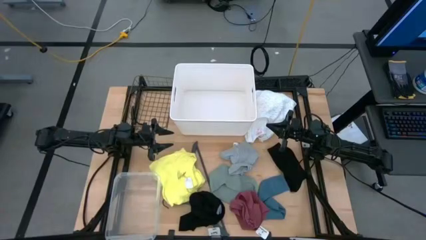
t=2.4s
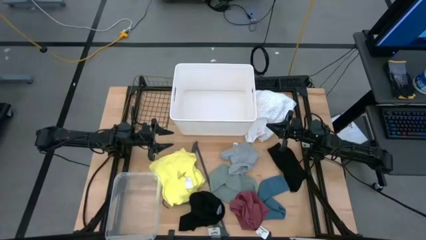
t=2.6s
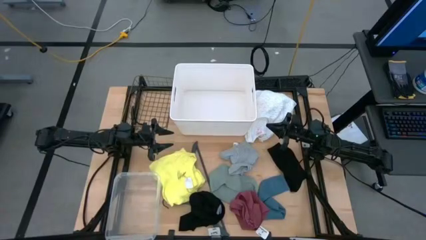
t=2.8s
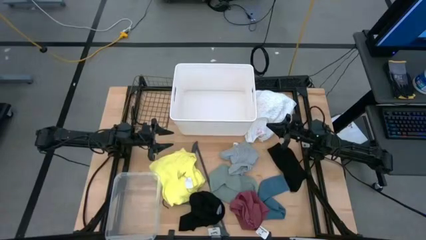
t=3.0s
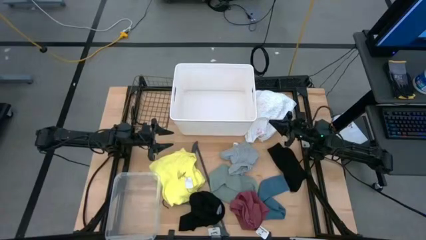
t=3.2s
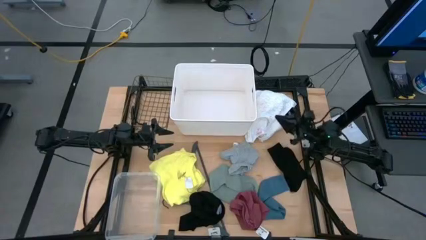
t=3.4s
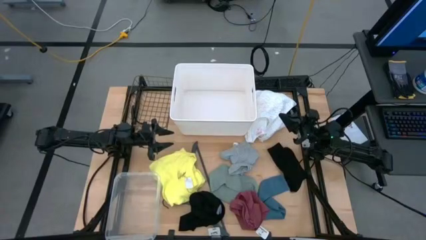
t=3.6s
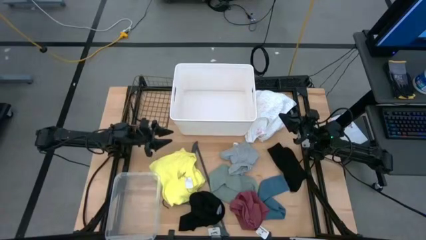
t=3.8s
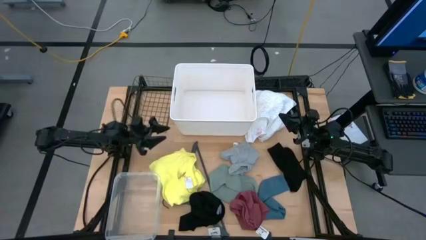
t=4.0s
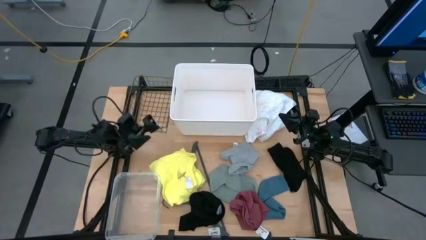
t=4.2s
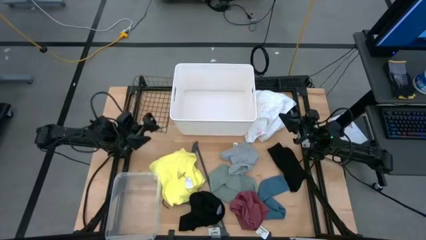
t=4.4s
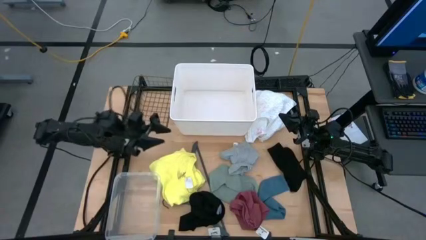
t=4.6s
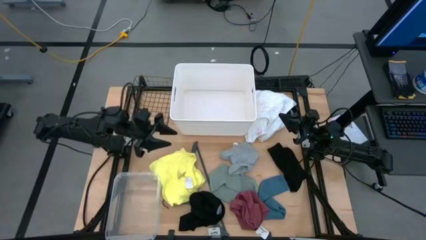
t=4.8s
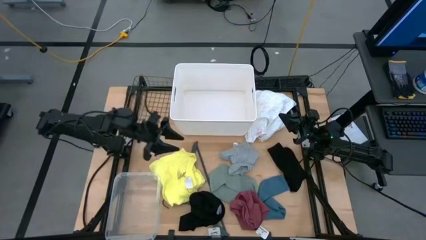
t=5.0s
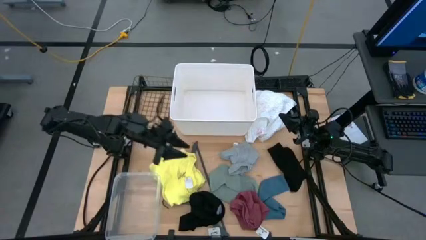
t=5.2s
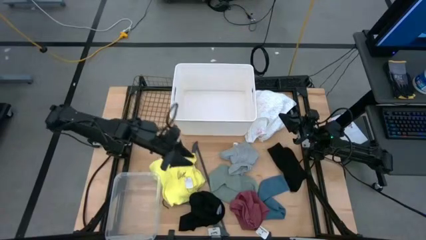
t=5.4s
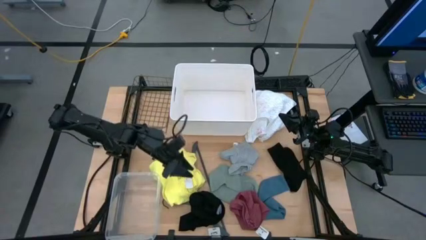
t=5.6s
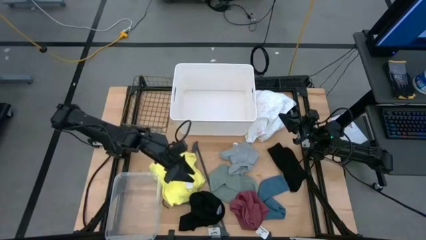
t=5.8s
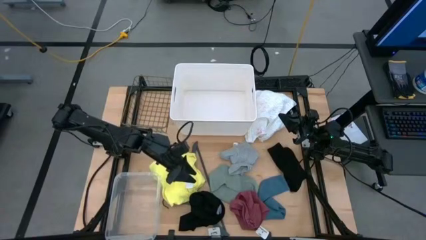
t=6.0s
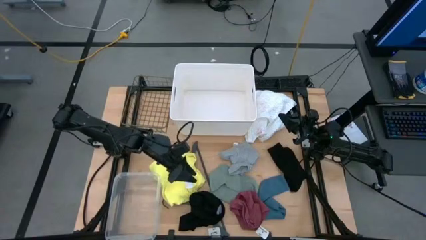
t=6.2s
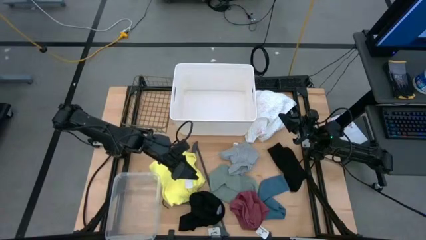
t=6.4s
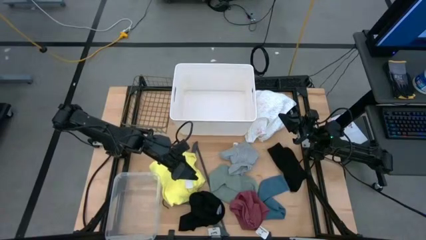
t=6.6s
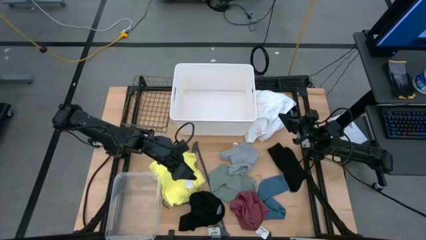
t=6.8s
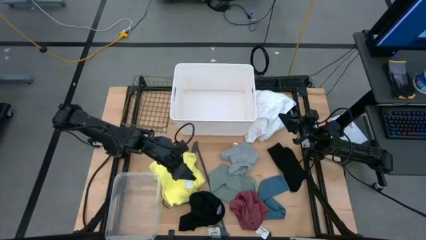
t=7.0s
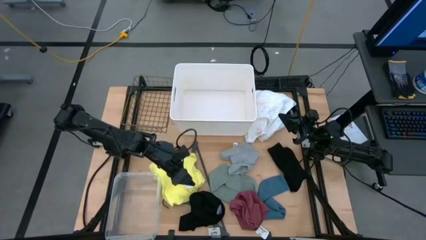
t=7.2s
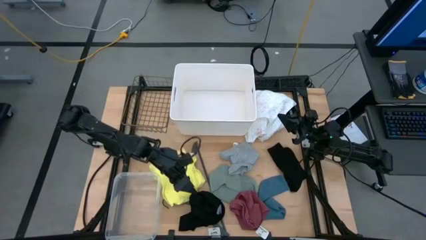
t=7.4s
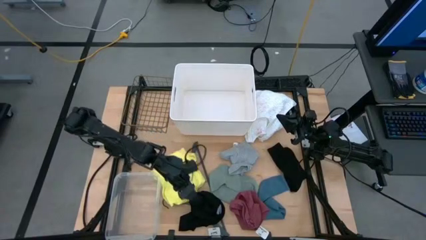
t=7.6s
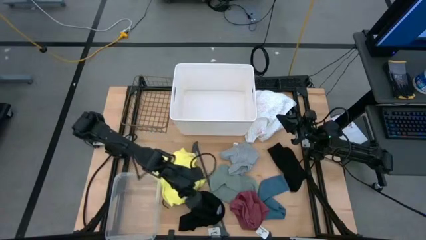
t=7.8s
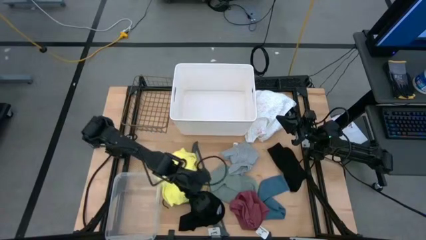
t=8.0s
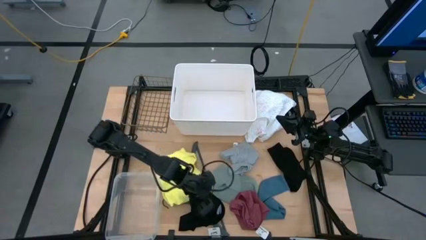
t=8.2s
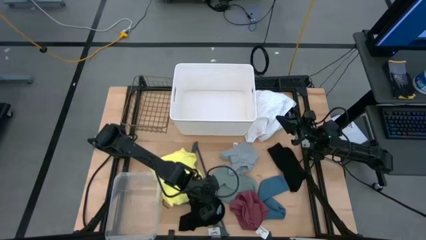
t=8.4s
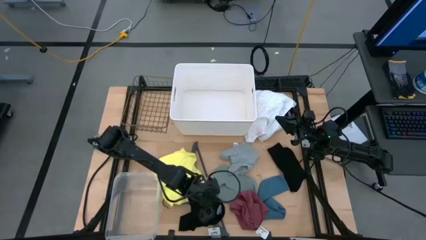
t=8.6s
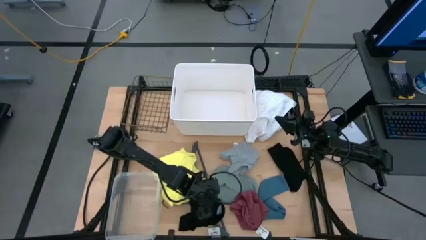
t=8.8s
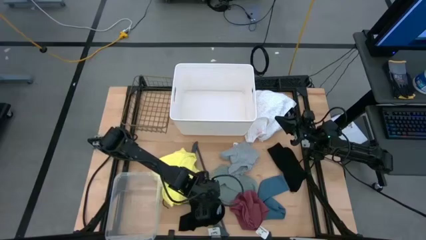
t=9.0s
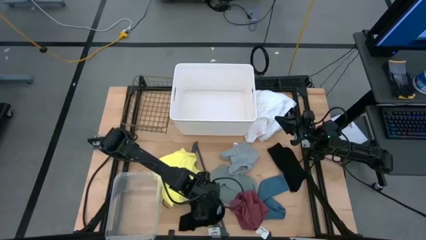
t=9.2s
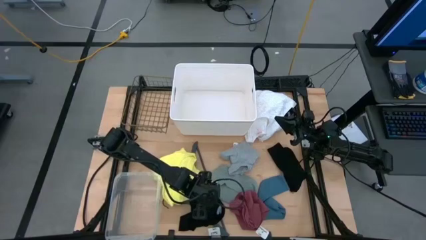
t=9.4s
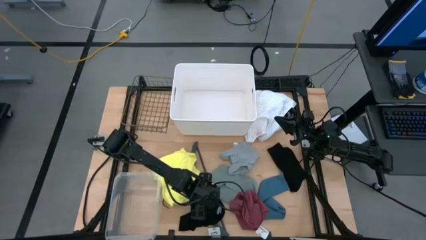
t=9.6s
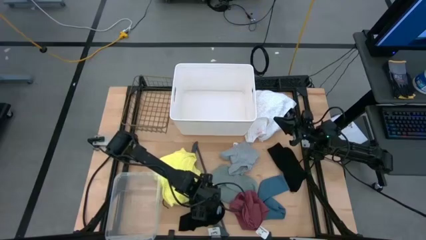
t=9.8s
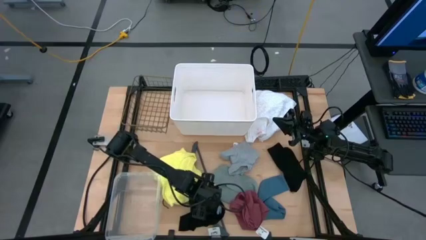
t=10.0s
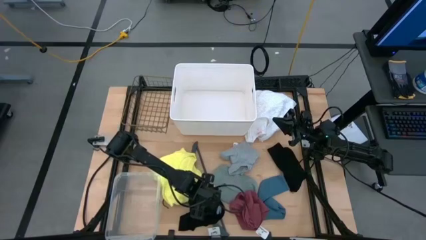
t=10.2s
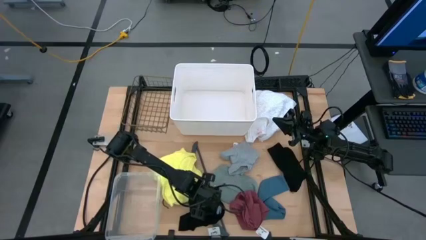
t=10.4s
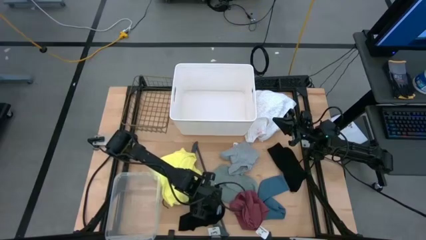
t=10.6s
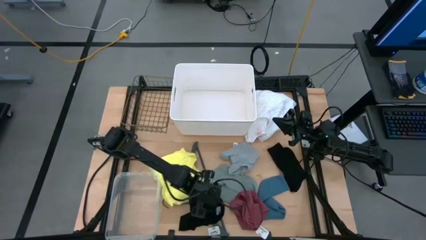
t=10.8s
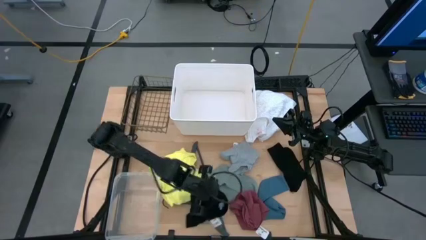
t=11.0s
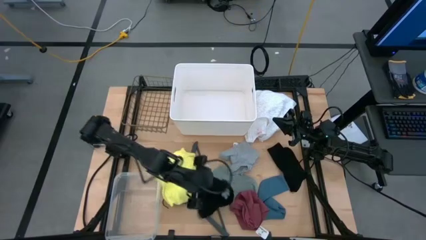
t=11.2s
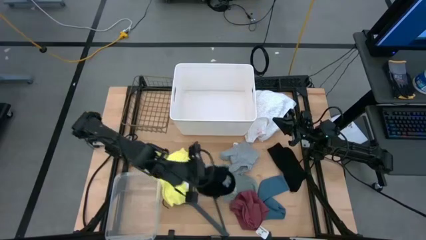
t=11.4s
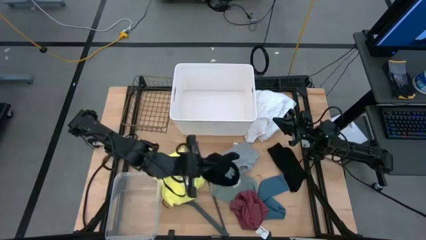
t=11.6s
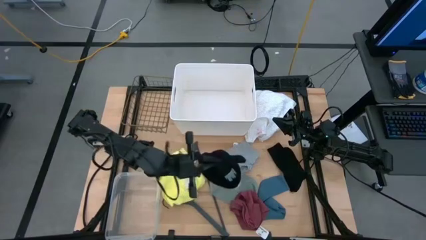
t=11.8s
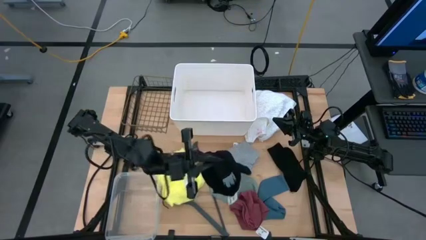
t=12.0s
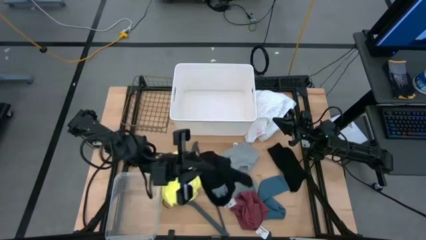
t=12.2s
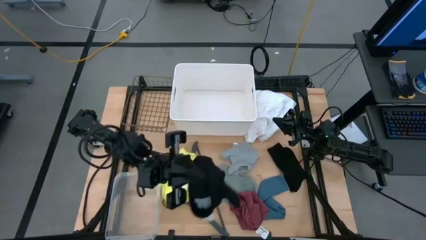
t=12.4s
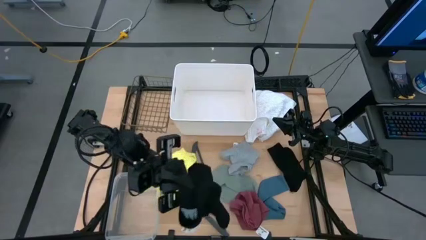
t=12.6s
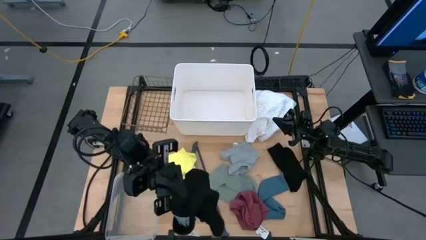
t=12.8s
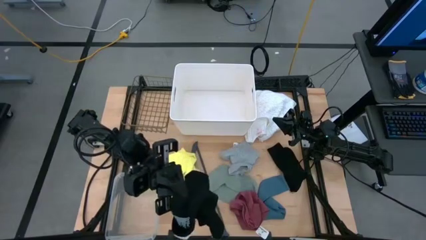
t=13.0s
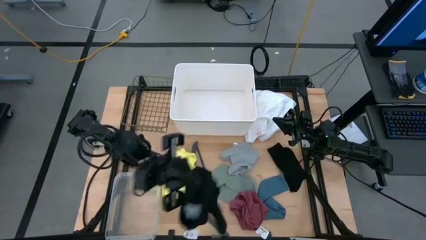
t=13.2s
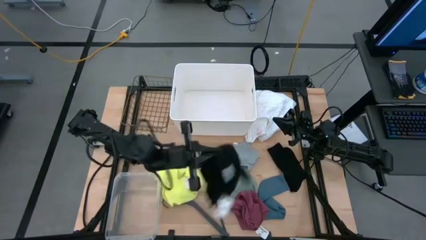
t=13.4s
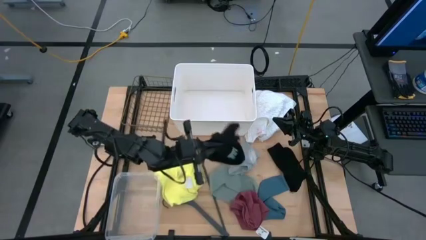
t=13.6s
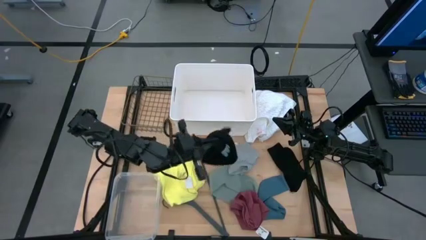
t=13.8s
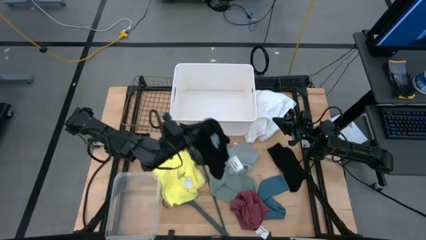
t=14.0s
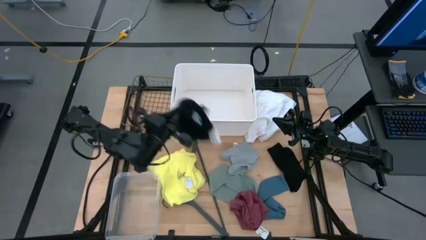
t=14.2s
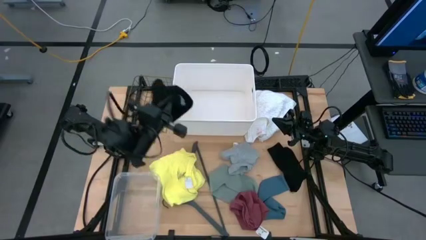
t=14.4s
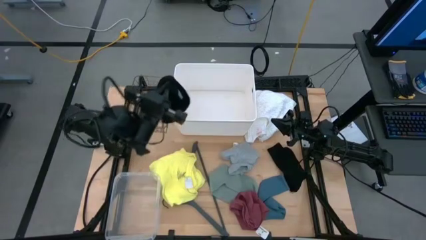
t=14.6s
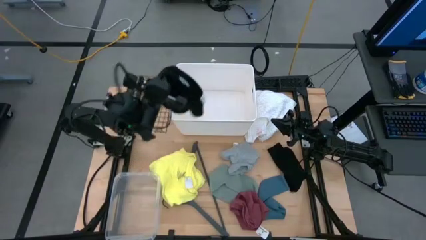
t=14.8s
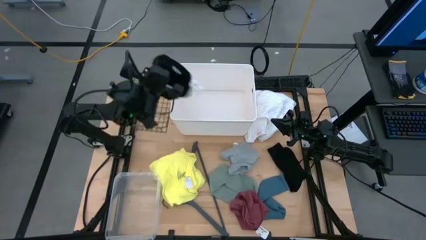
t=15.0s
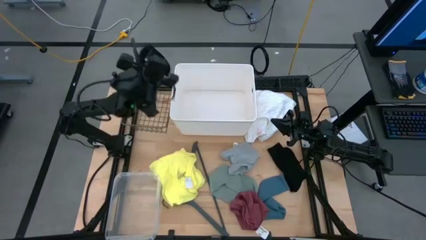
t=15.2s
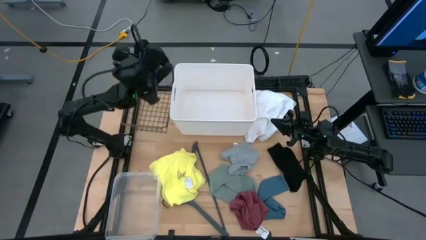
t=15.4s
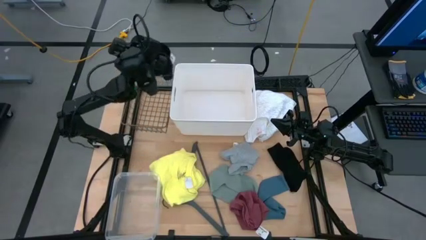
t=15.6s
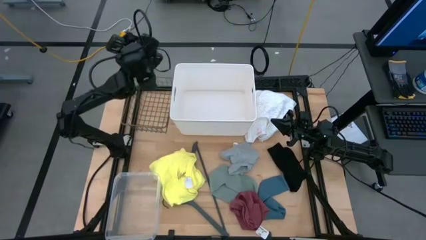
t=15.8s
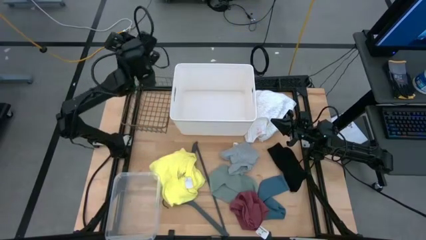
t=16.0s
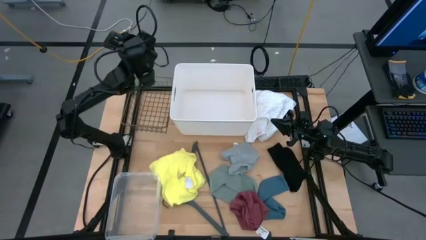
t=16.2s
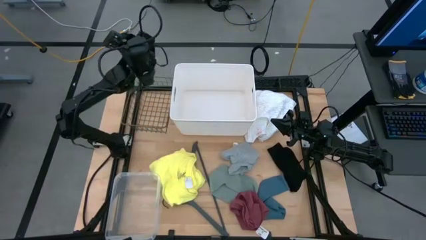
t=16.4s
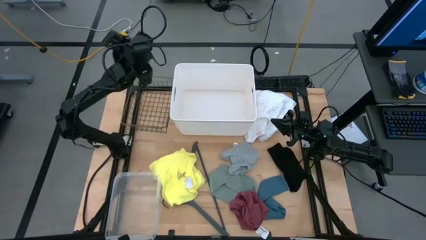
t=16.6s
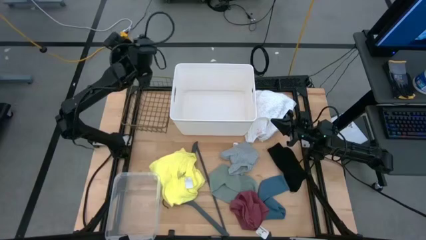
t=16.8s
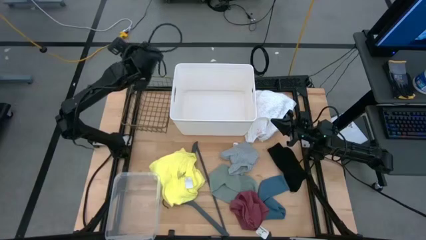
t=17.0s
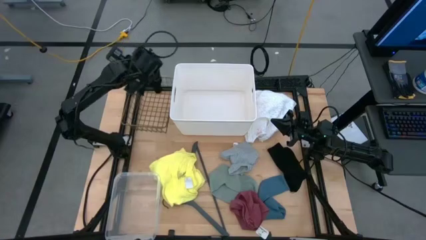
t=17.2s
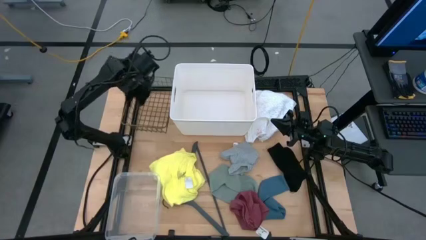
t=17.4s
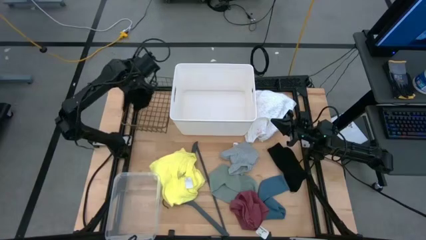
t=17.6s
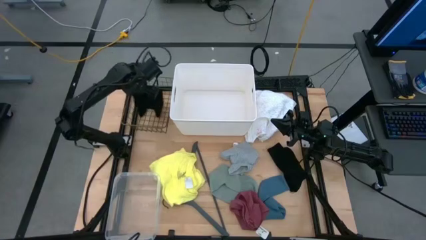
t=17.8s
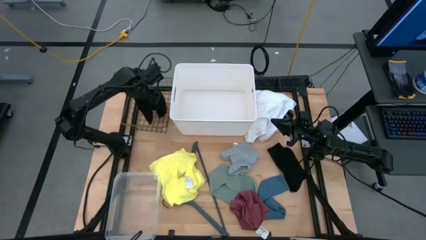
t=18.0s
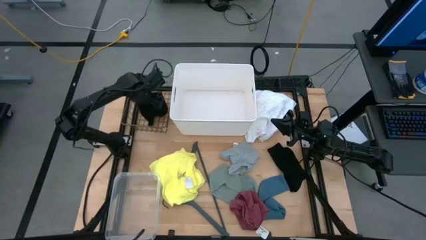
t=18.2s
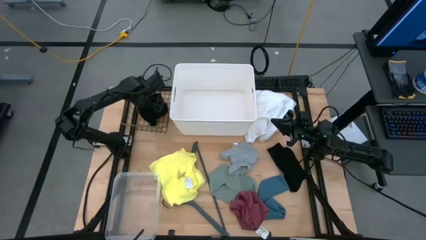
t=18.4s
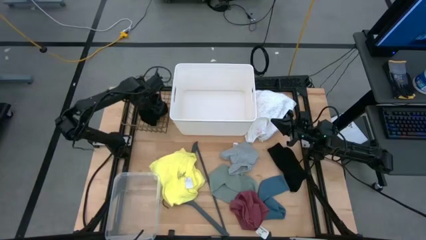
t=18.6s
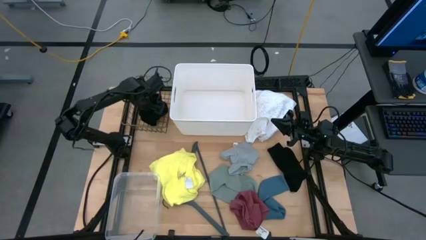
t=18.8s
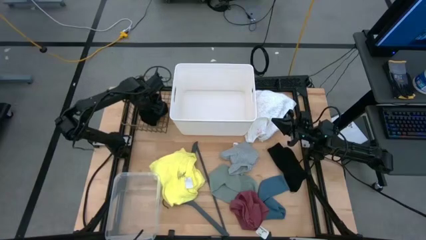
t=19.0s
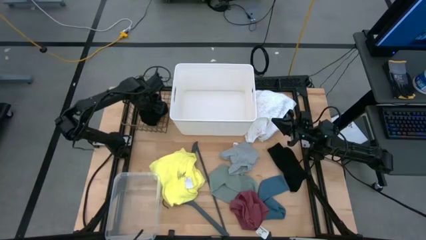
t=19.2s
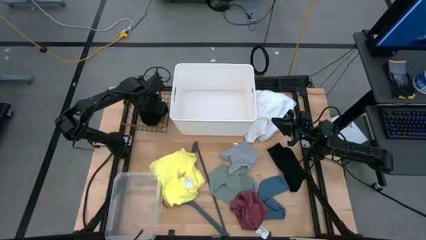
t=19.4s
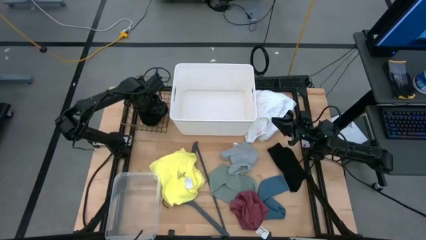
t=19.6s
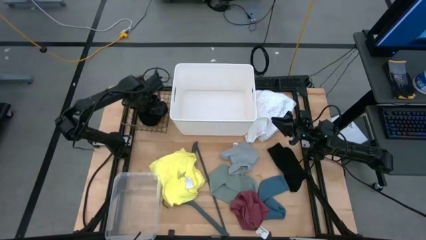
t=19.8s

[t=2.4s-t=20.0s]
Task: Pick & Place Cloths
Put the black underwear into the wired basket
